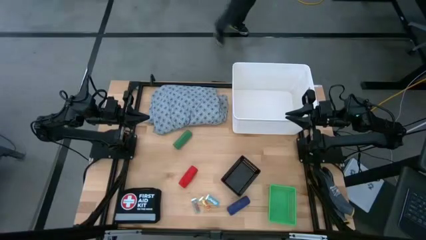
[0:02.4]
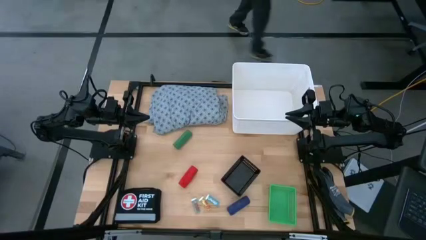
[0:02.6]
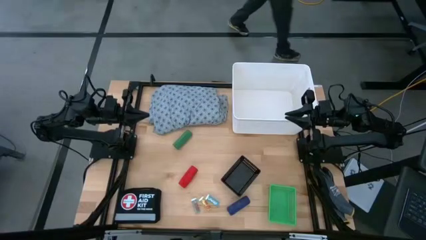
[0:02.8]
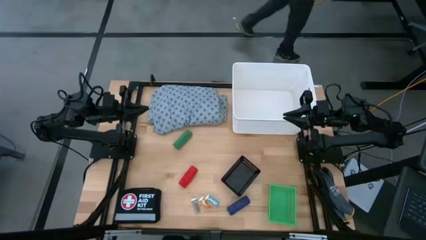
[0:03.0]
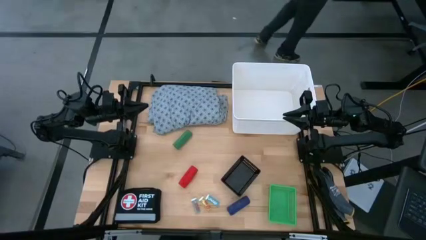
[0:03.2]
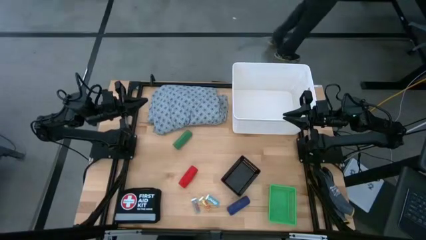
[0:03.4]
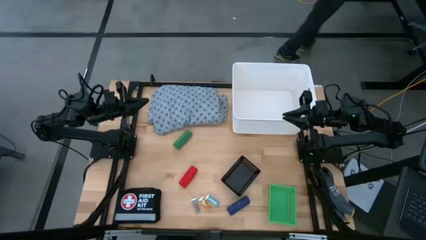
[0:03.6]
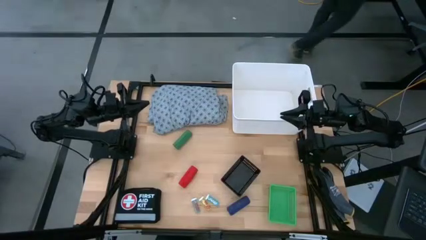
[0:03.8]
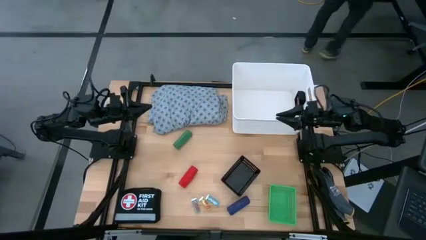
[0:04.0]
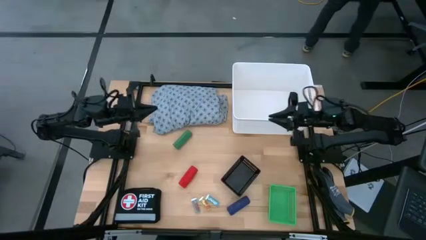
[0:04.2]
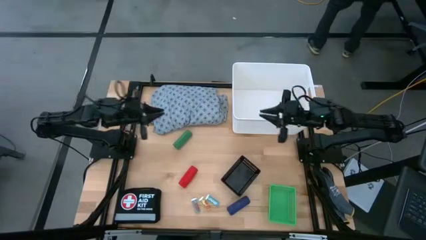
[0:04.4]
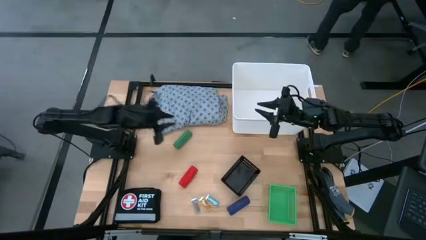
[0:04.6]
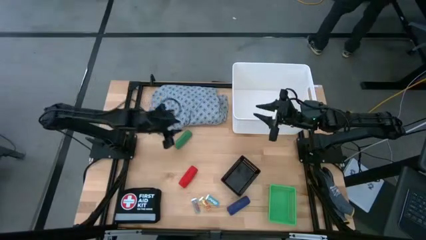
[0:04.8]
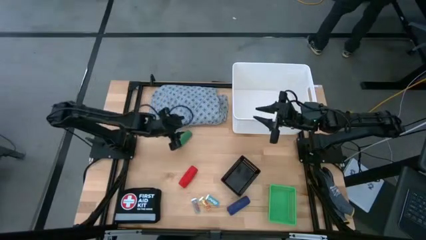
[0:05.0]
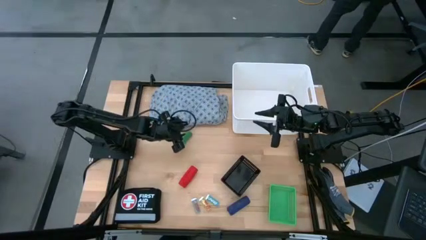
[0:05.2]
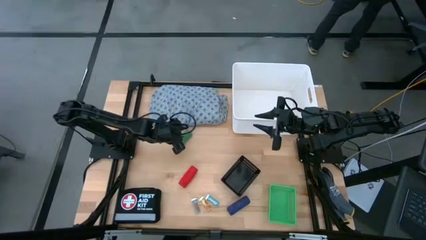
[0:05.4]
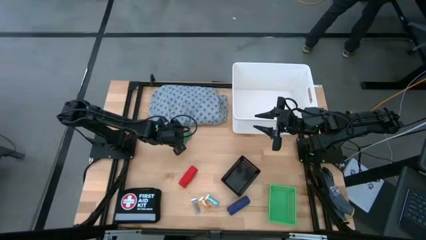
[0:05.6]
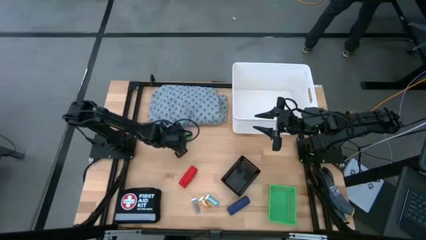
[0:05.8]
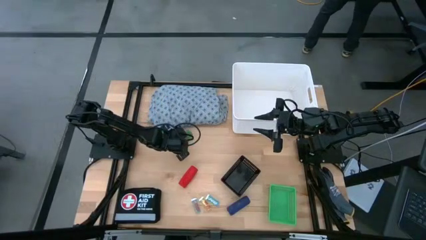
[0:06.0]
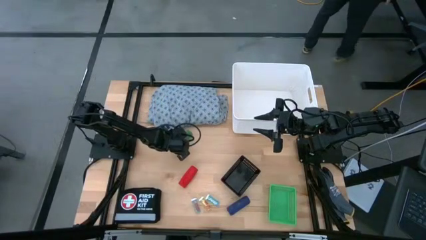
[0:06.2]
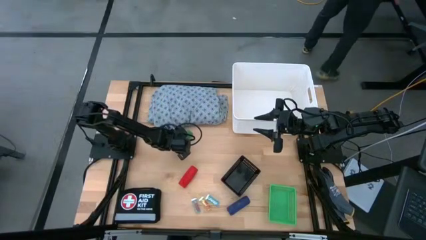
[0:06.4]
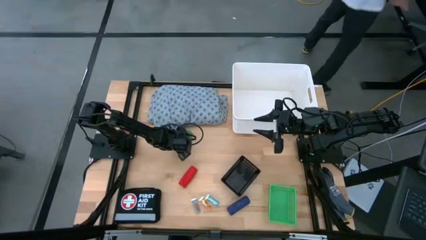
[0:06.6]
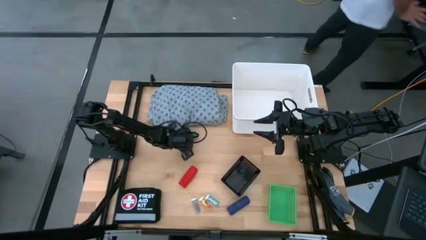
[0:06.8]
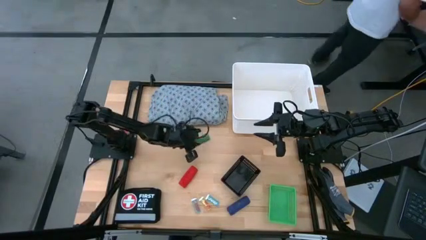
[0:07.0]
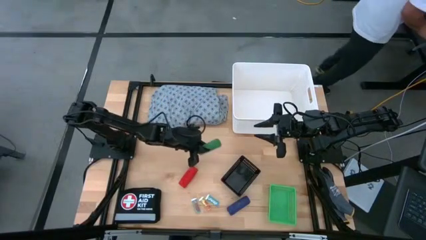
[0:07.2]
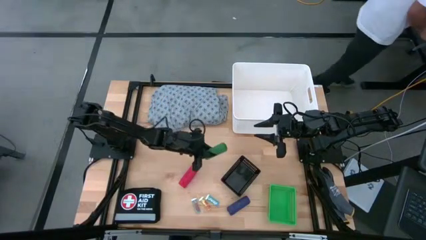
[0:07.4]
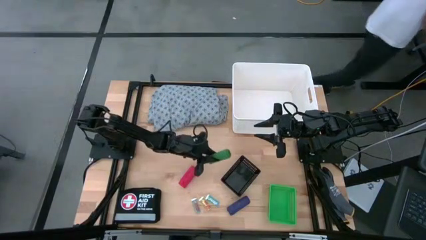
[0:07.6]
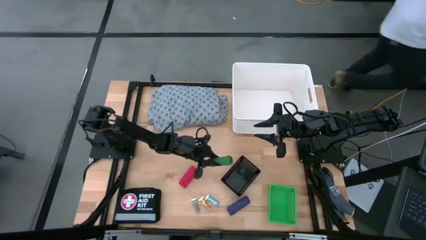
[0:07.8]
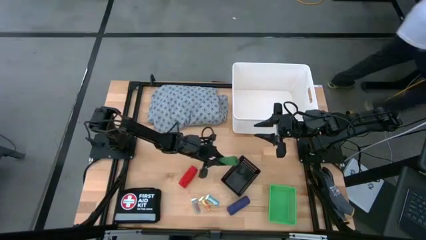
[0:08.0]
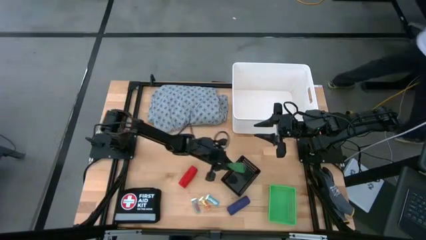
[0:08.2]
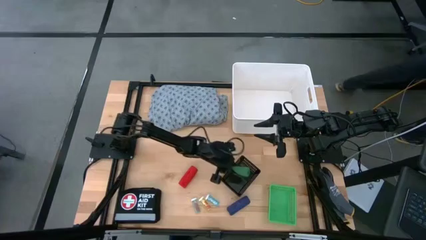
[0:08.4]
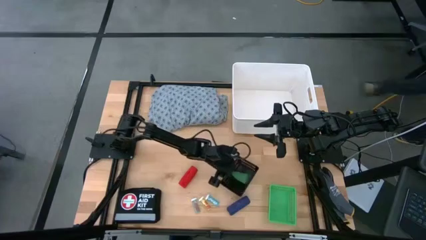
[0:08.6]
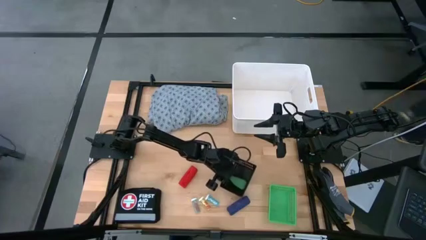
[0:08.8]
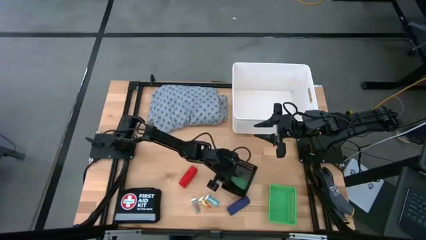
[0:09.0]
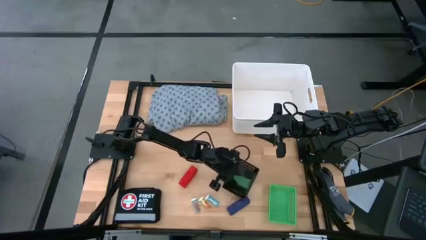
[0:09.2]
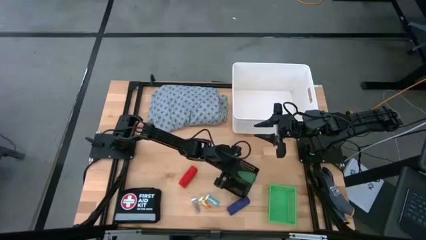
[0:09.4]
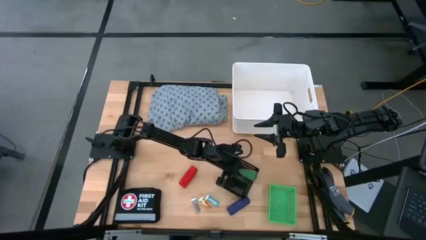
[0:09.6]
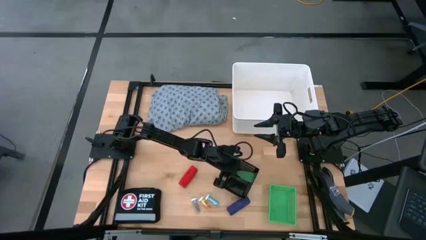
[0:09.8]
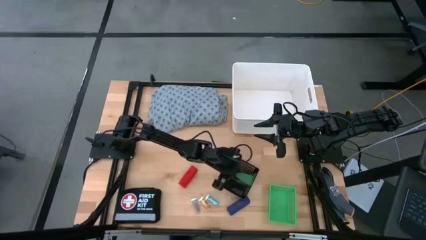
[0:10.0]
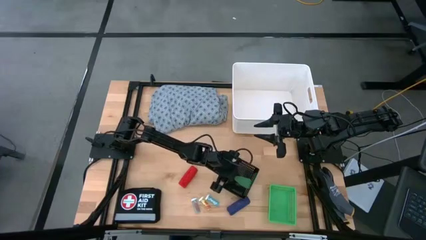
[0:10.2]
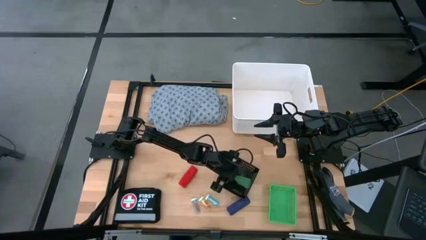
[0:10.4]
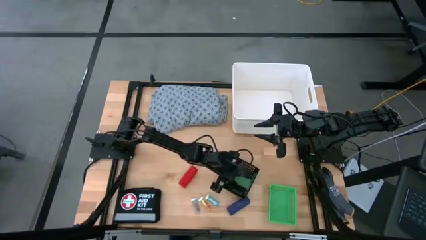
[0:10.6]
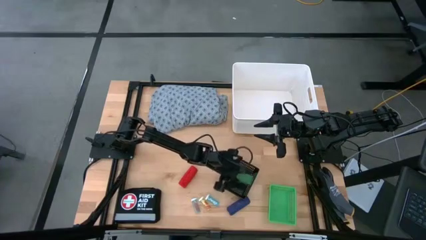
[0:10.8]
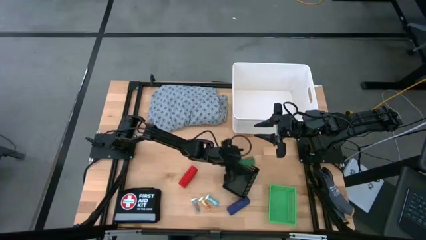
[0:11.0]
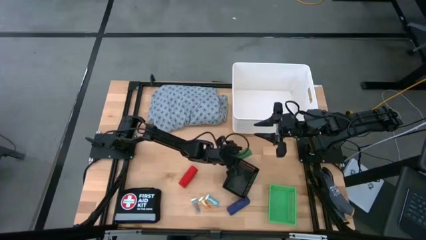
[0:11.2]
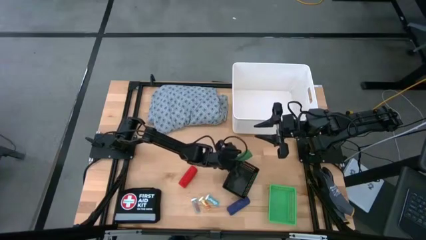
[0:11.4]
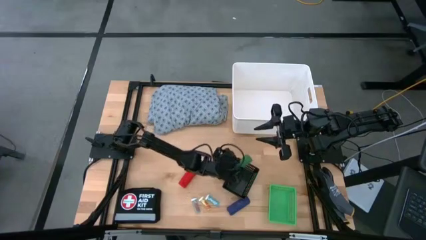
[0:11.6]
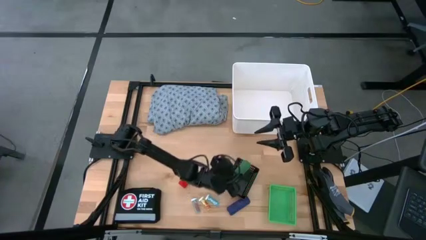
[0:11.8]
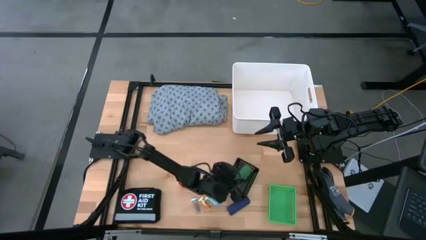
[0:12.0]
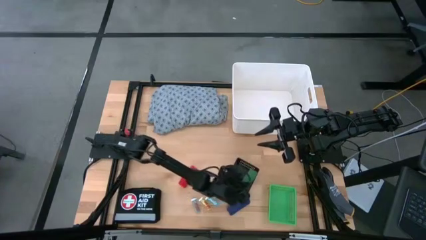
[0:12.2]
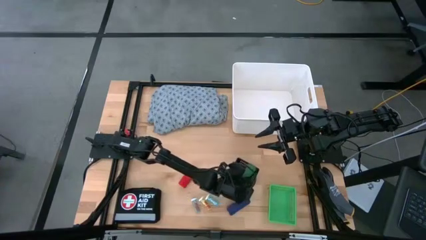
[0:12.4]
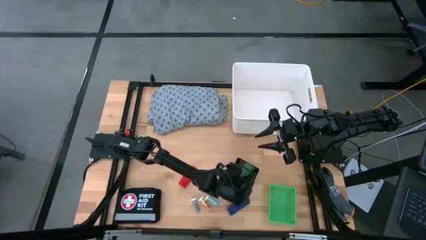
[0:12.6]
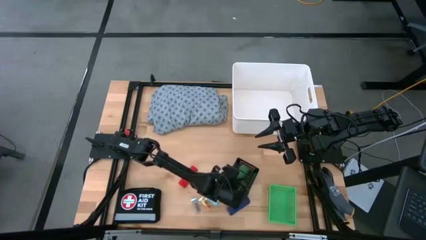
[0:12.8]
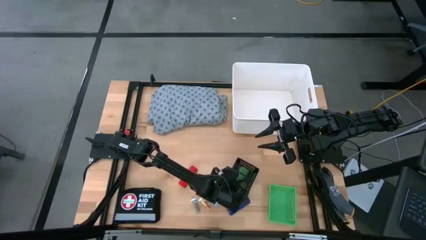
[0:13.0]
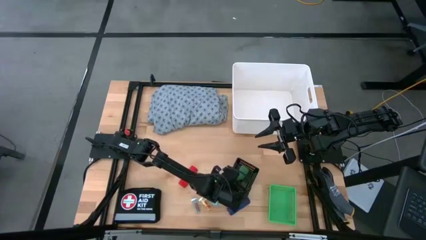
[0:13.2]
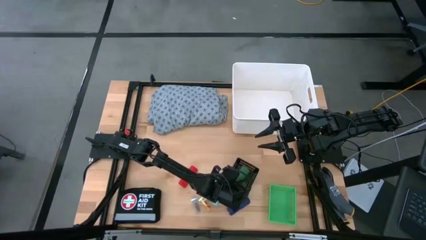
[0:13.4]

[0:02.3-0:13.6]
Task: Pick & place medical supplies in basket/bin
Put the green bandage into the black bin

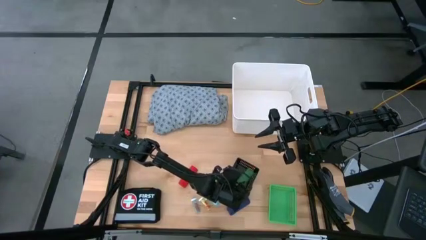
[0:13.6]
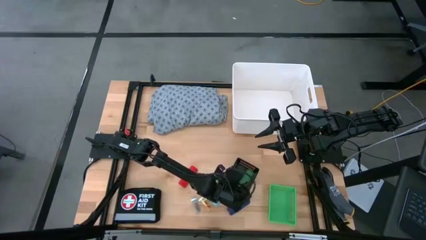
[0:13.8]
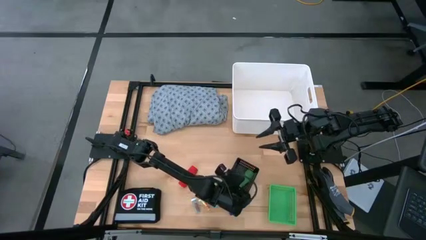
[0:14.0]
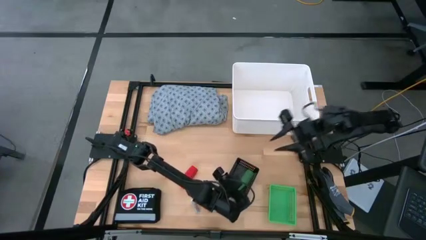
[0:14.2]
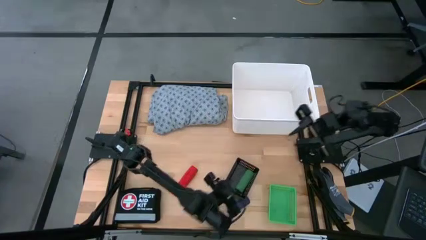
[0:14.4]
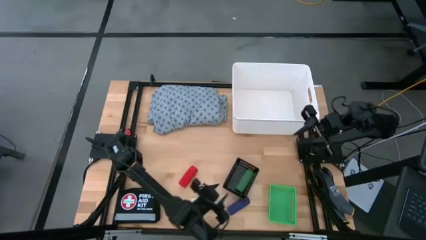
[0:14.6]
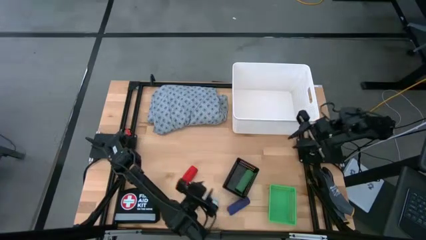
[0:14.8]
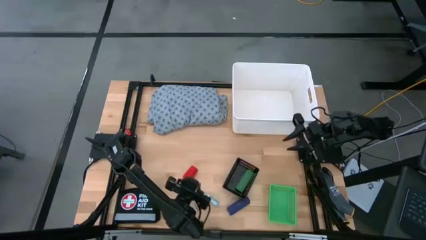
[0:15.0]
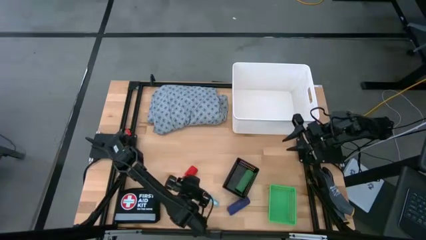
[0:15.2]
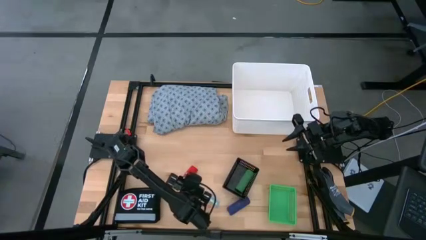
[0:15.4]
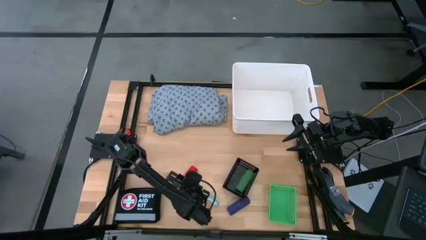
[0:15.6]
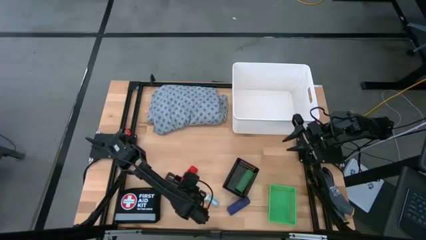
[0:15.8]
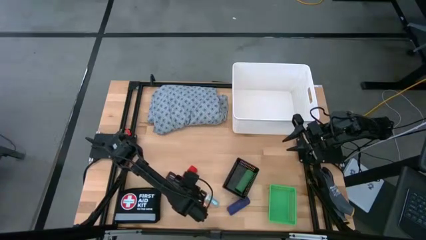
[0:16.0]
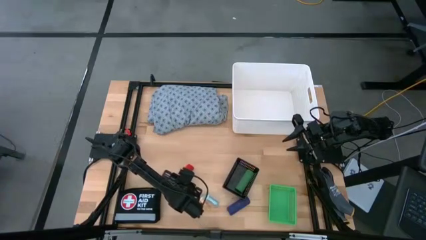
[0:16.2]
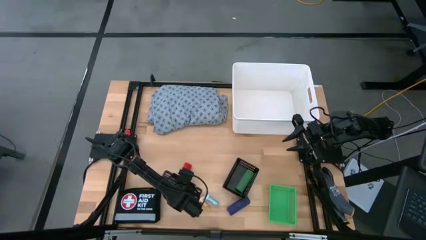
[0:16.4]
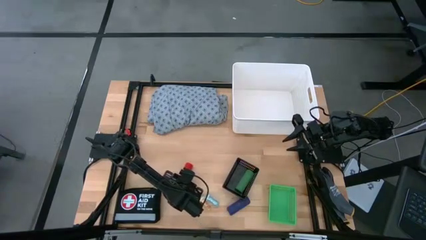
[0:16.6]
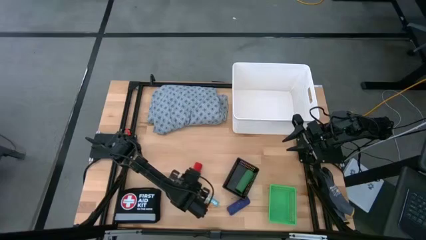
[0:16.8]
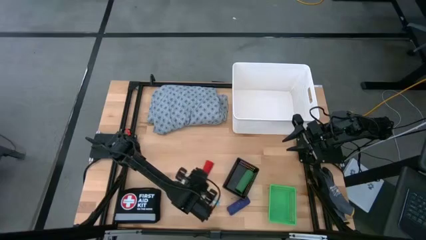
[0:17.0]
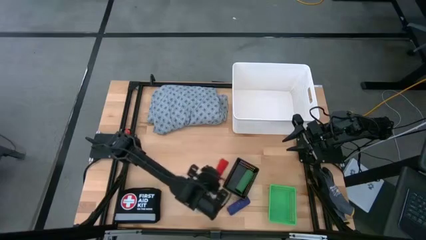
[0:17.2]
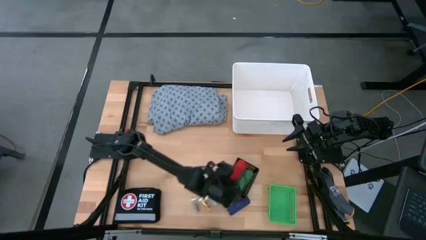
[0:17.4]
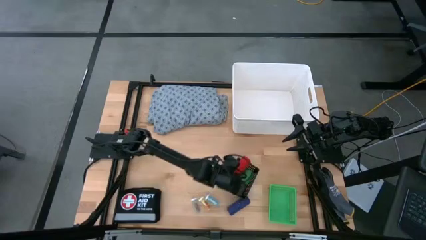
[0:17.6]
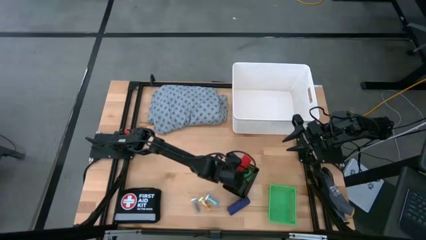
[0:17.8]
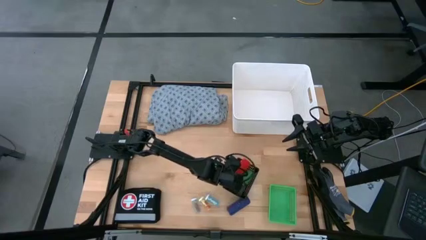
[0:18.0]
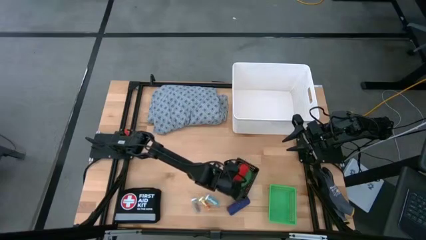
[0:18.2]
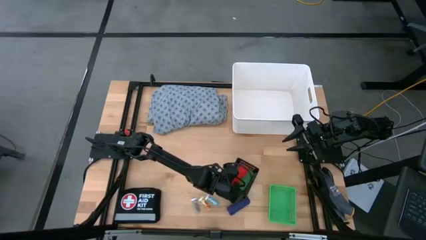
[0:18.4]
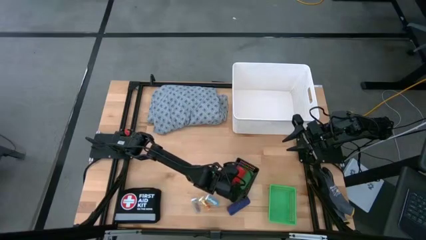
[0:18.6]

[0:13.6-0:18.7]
Put the red bandage into the black bin
